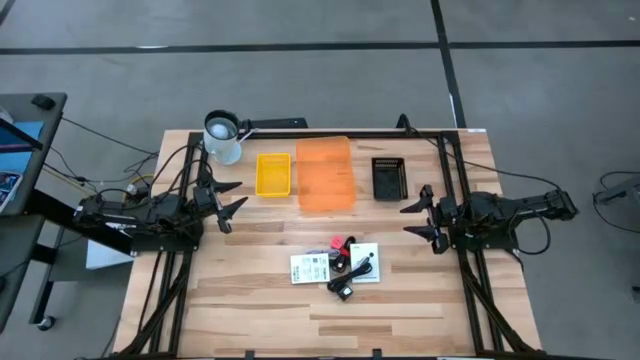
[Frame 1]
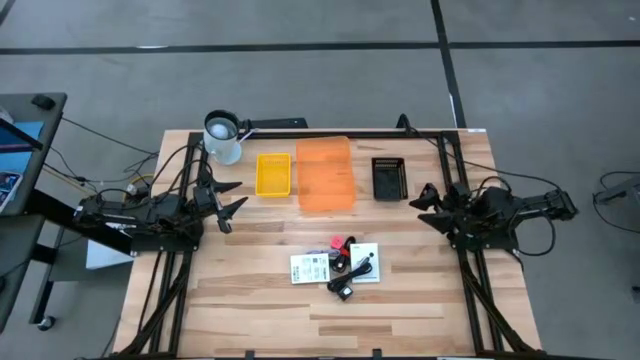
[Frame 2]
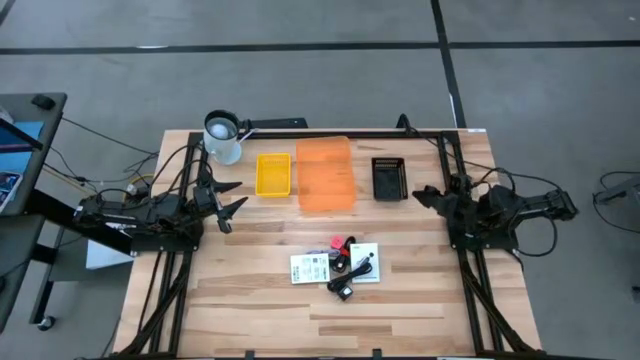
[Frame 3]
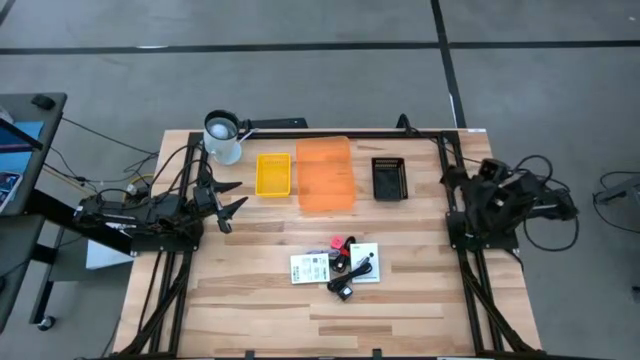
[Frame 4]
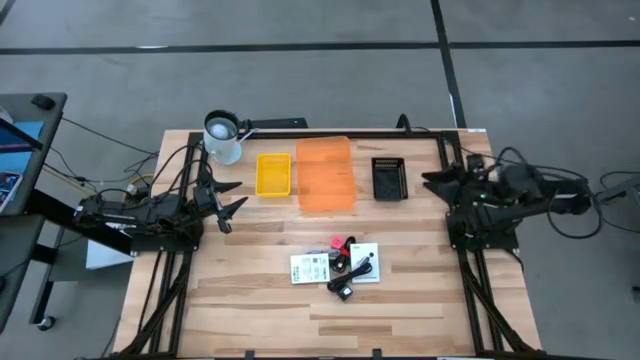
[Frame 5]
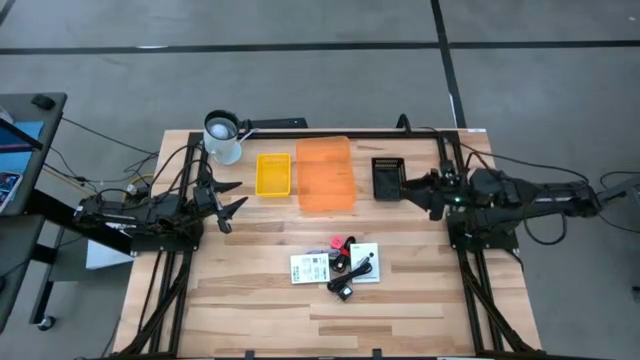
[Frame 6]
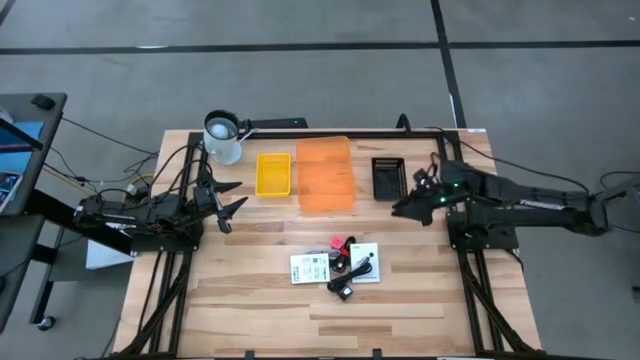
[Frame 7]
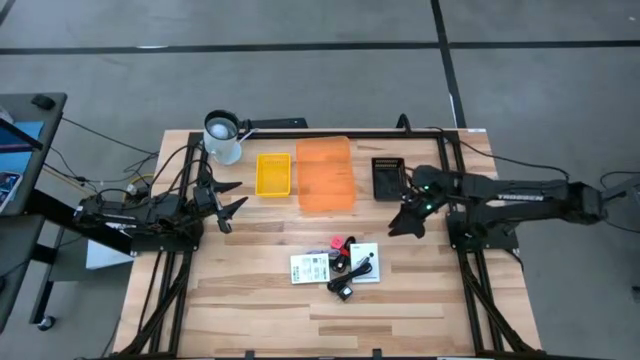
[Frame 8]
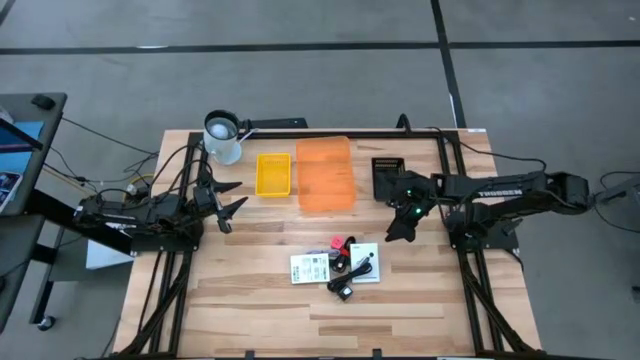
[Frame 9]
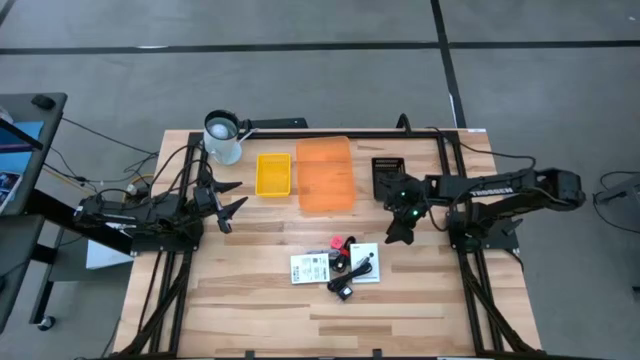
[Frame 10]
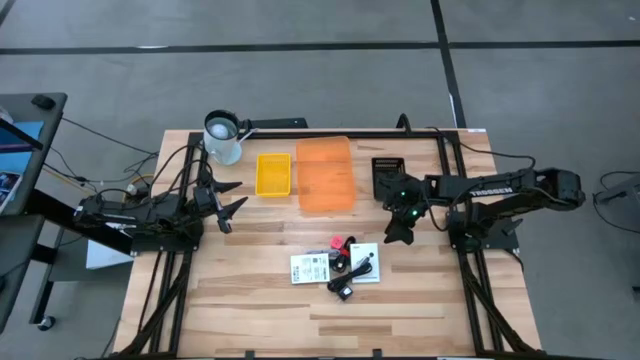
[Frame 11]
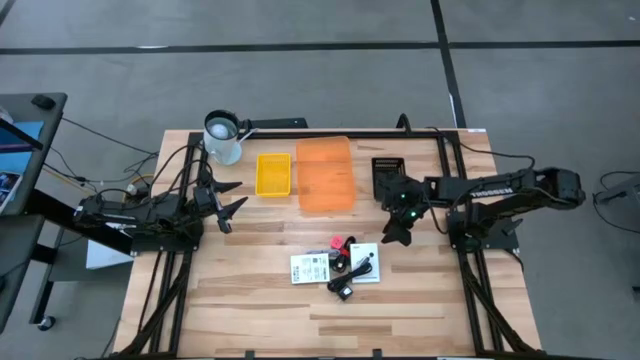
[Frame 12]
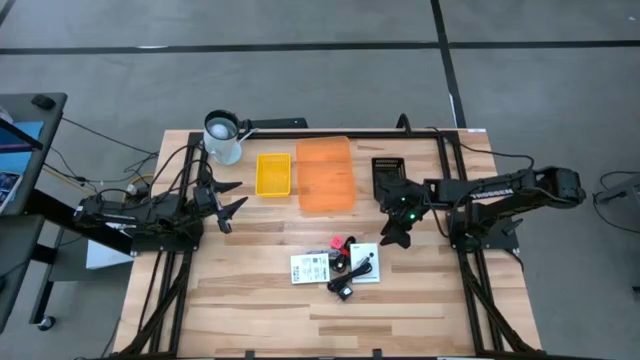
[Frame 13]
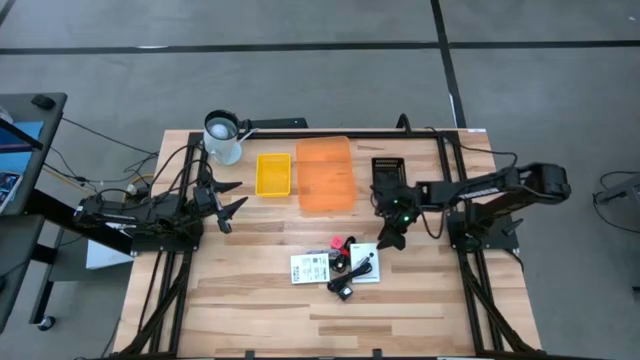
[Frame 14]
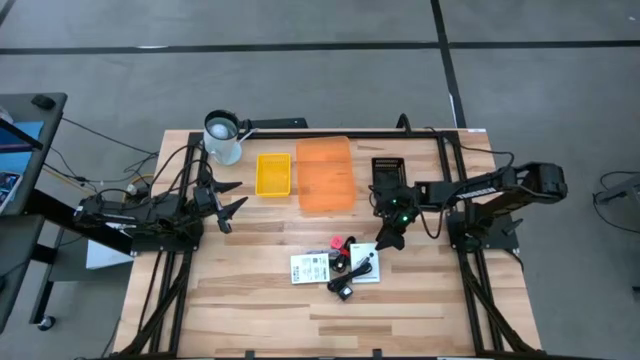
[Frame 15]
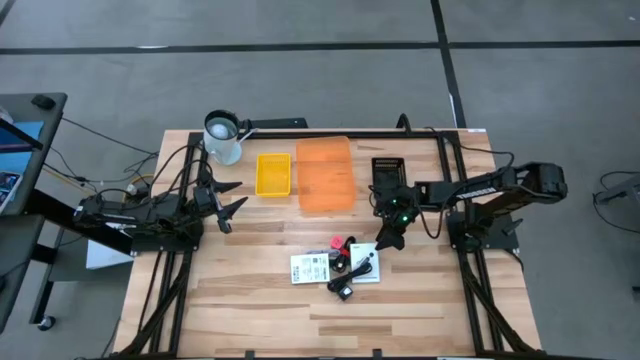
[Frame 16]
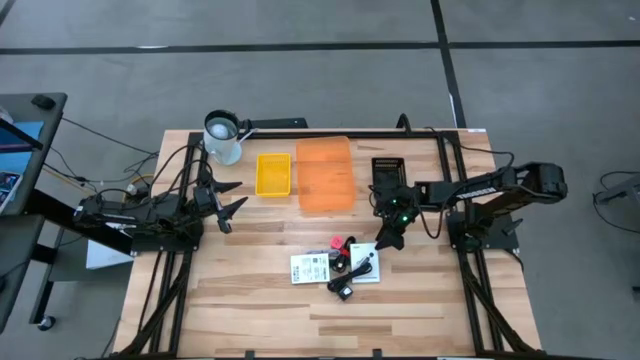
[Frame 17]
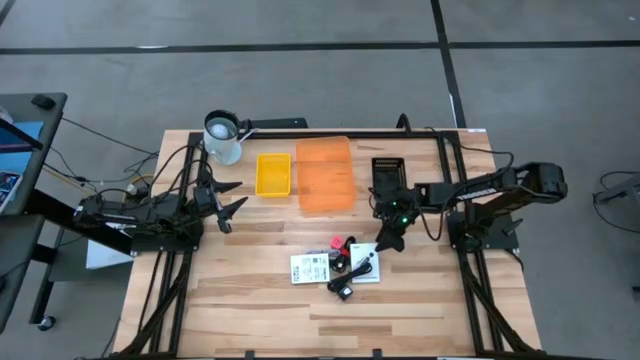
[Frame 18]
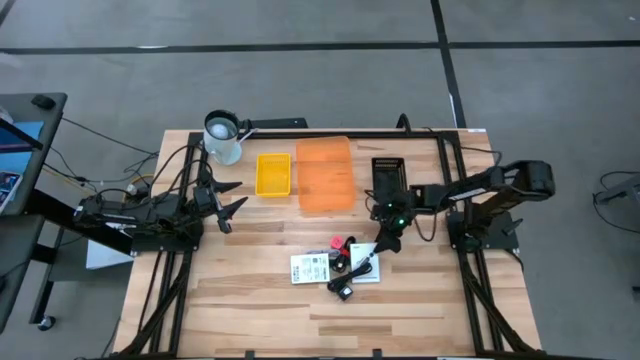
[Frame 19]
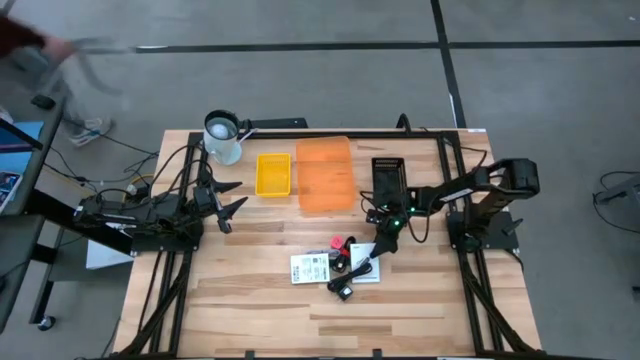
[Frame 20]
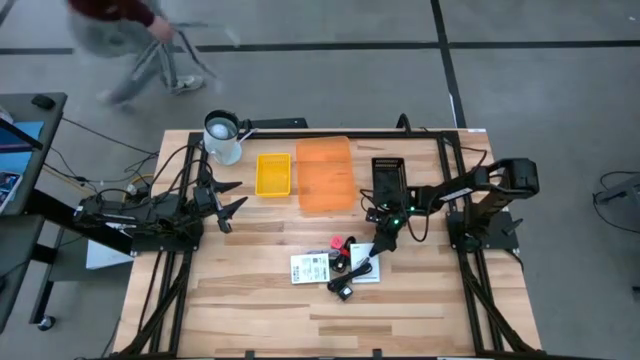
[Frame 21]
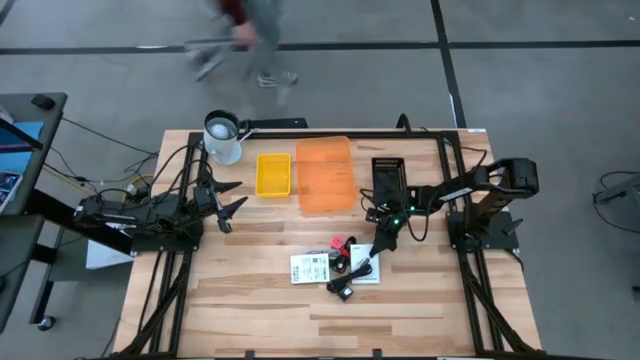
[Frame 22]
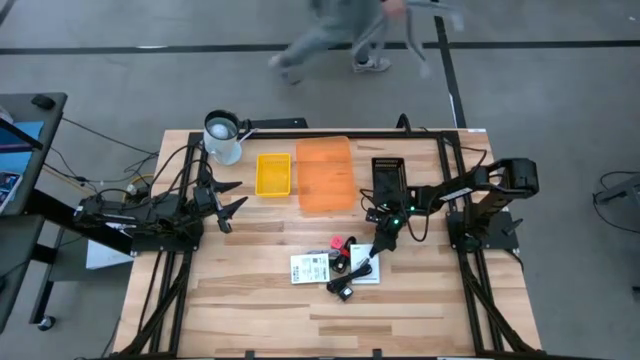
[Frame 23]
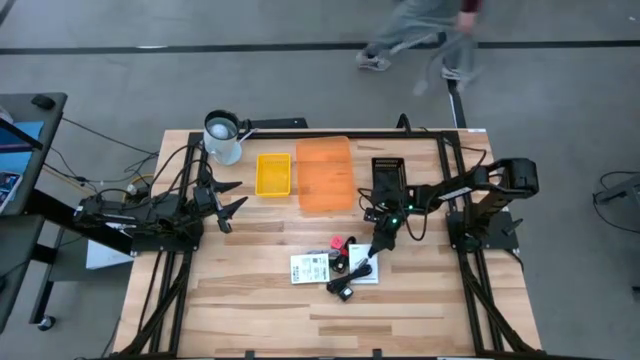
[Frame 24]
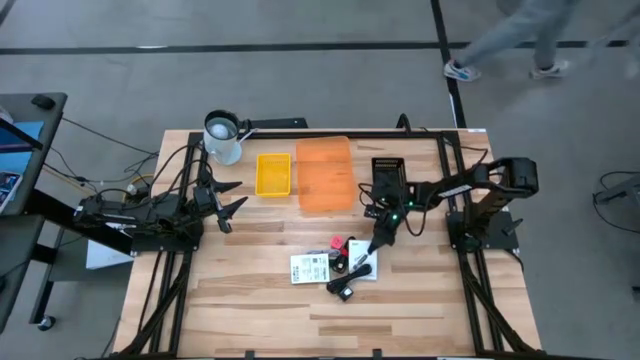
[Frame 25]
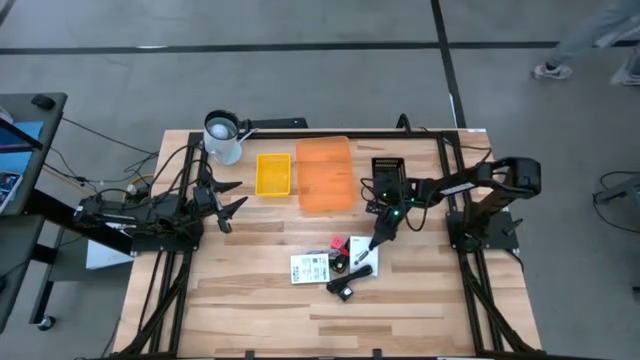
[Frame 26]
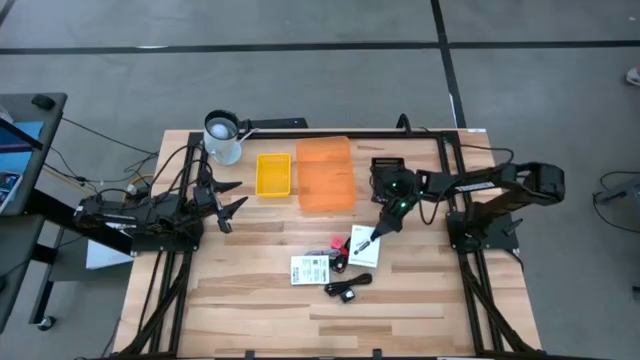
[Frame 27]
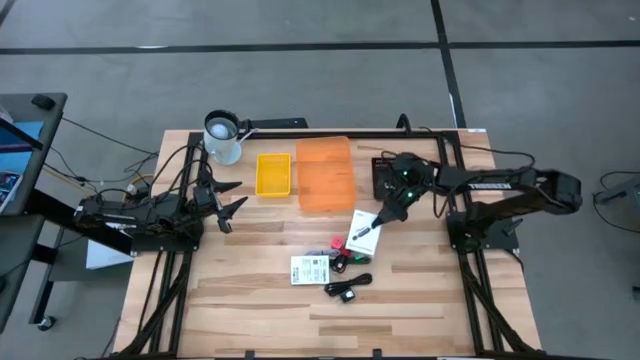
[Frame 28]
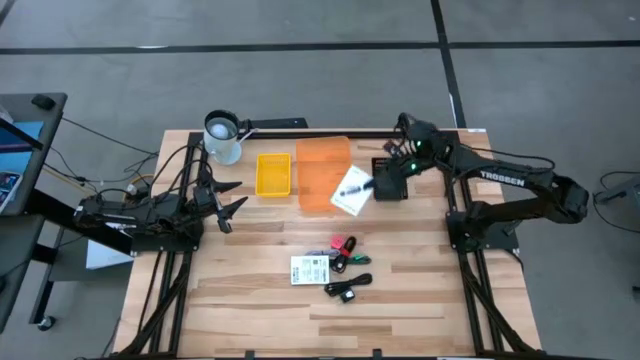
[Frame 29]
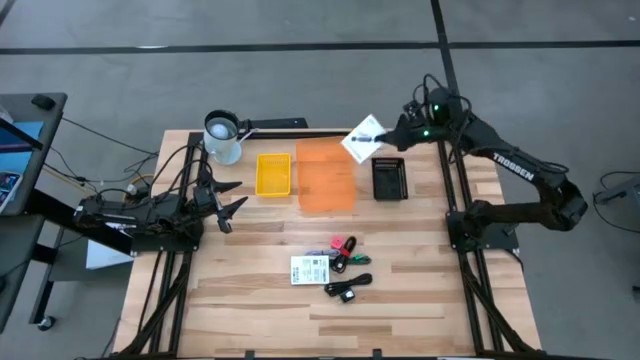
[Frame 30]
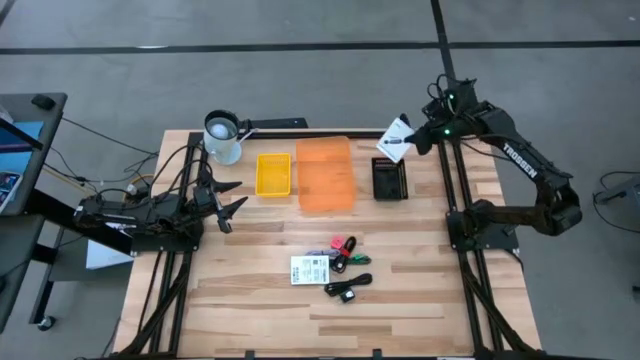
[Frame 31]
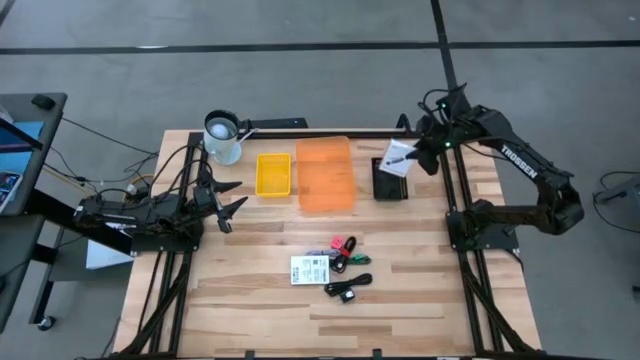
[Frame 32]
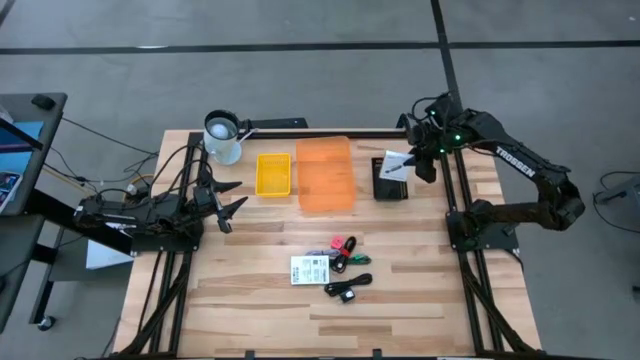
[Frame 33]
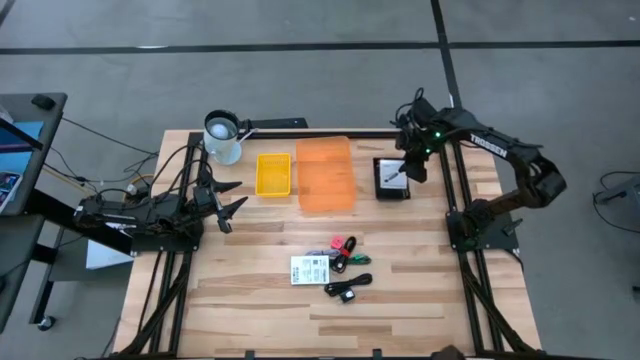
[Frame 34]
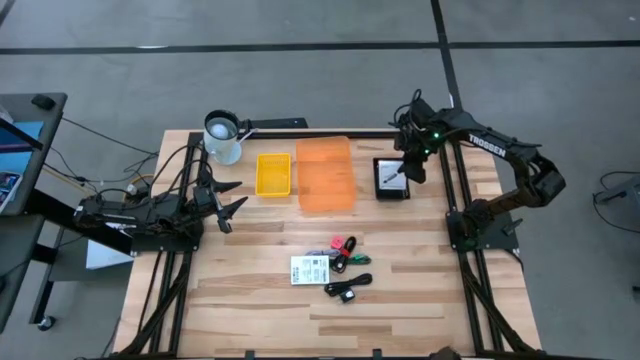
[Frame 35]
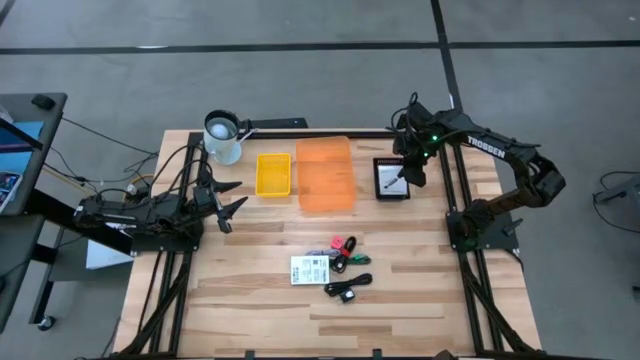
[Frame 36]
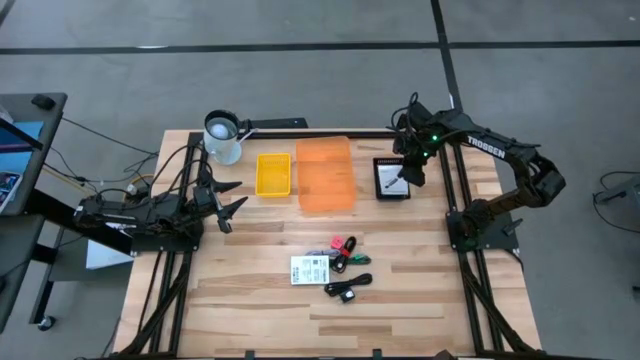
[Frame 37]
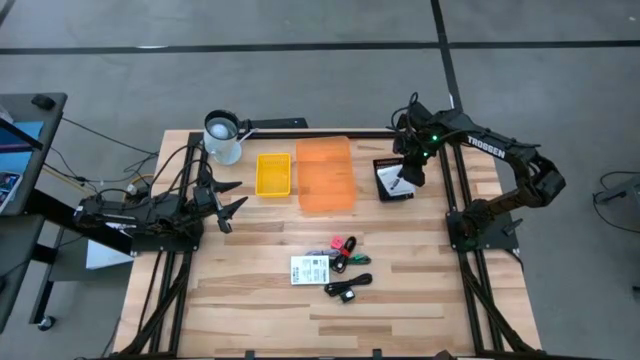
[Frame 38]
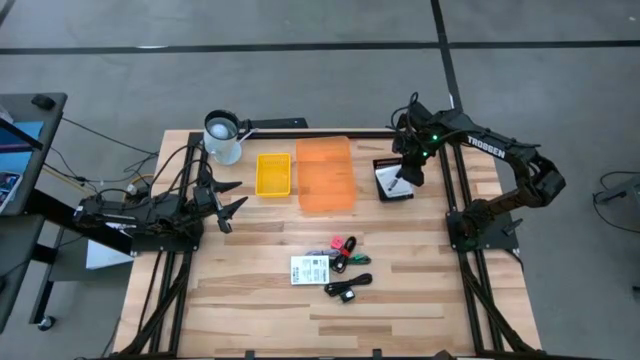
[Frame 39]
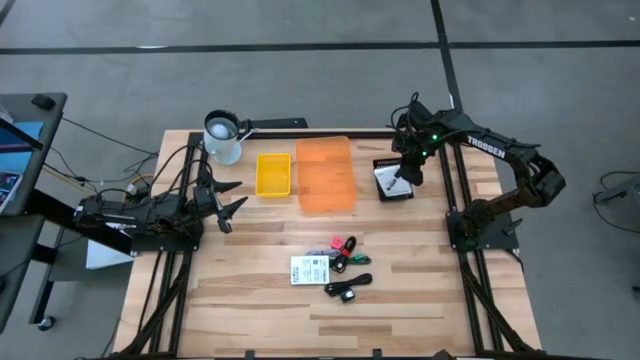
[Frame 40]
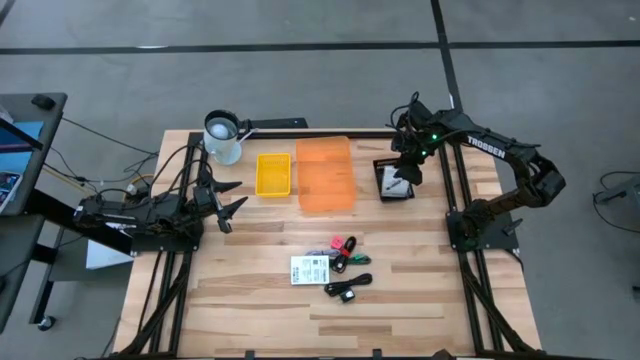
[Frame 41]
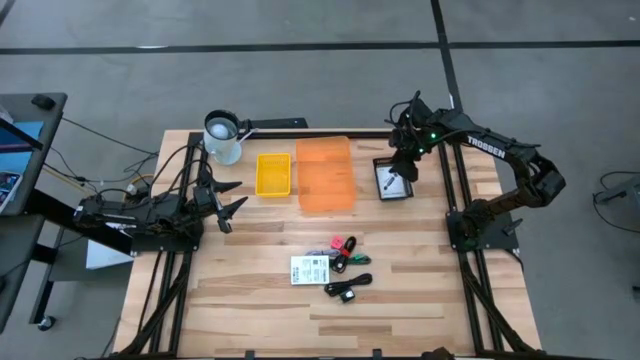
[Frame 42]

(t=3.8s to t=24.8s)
Task: Pick and place items into bin
Put the right white card reader box into the black bin
